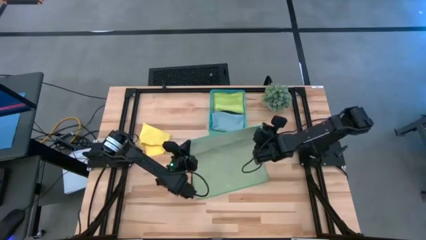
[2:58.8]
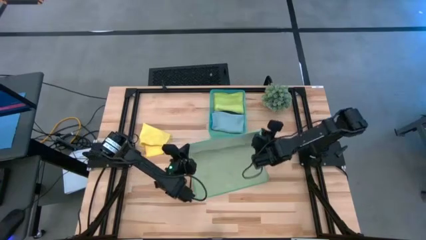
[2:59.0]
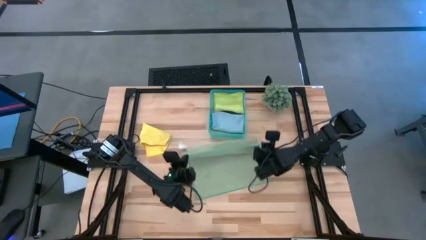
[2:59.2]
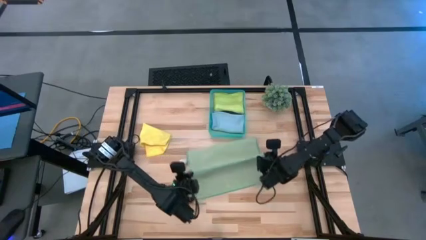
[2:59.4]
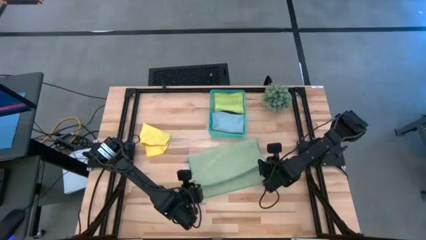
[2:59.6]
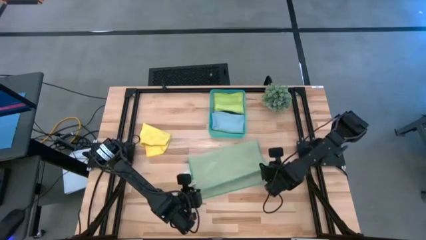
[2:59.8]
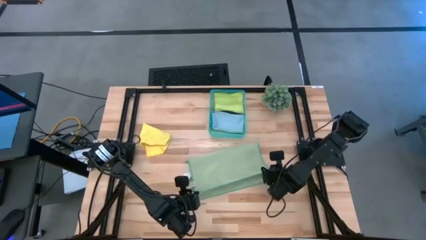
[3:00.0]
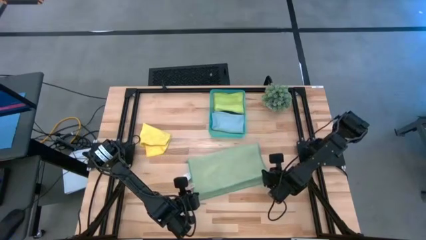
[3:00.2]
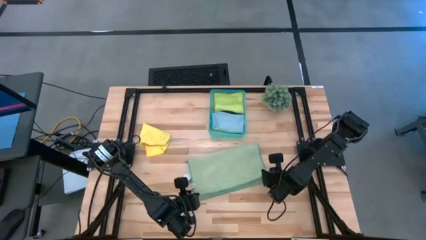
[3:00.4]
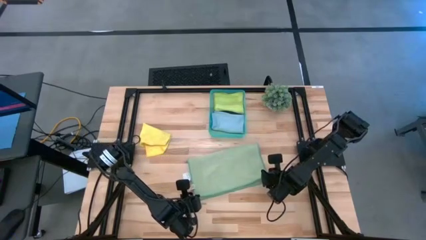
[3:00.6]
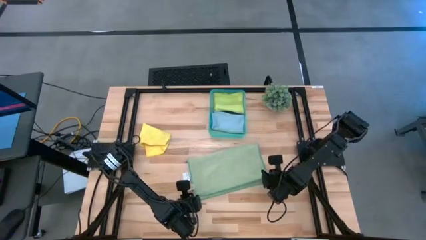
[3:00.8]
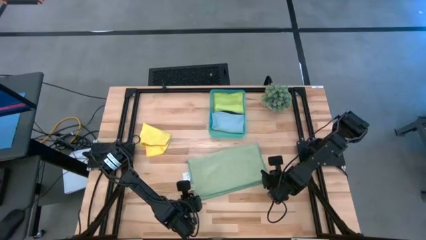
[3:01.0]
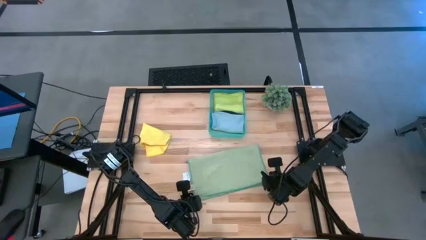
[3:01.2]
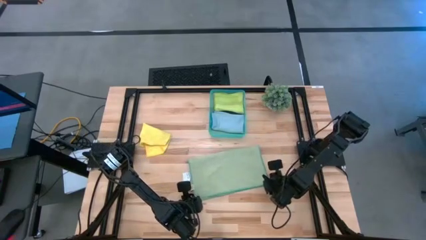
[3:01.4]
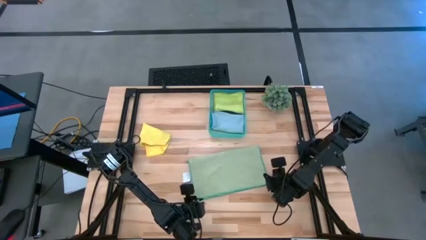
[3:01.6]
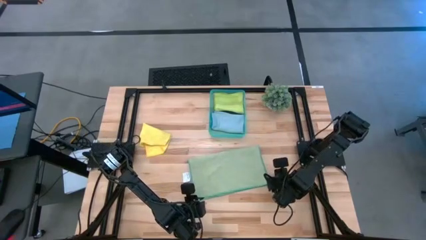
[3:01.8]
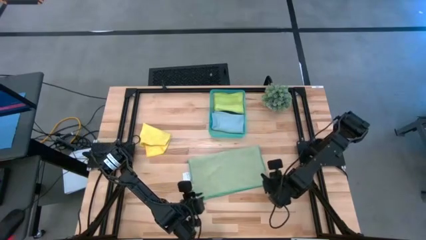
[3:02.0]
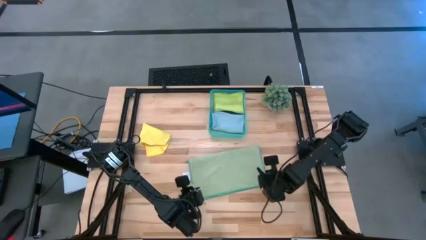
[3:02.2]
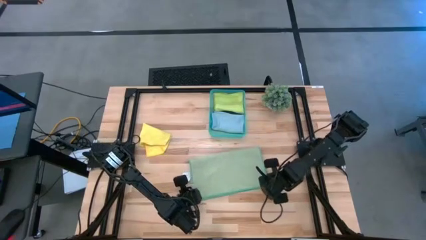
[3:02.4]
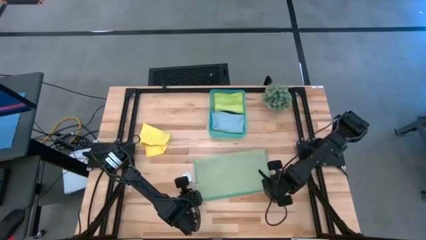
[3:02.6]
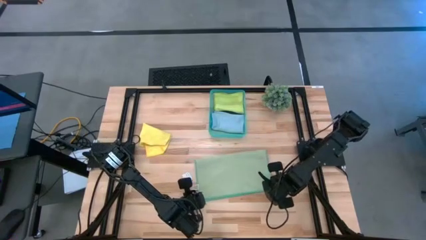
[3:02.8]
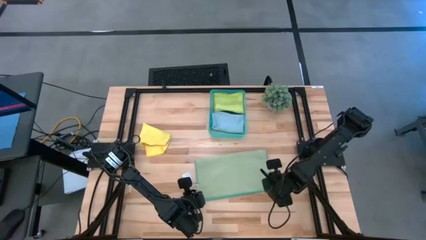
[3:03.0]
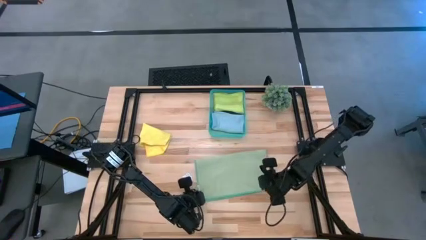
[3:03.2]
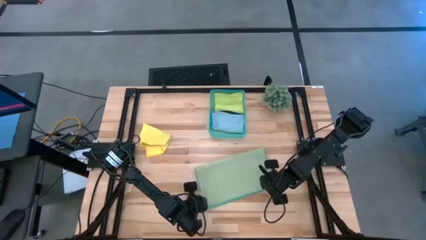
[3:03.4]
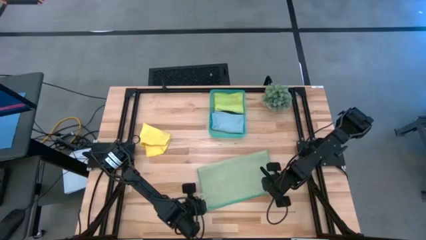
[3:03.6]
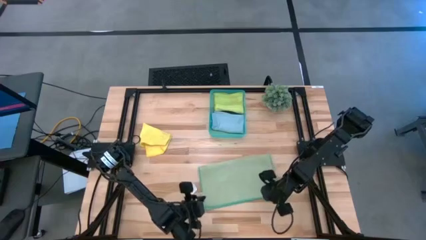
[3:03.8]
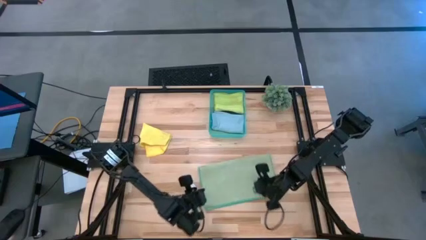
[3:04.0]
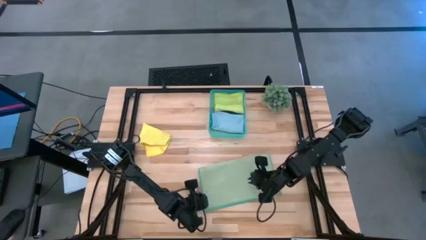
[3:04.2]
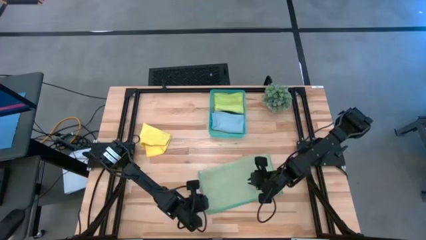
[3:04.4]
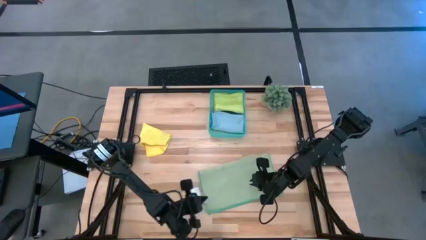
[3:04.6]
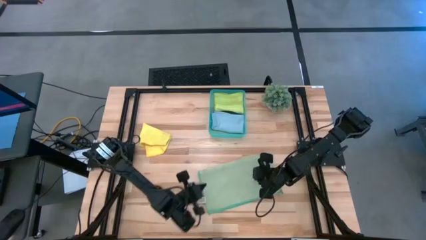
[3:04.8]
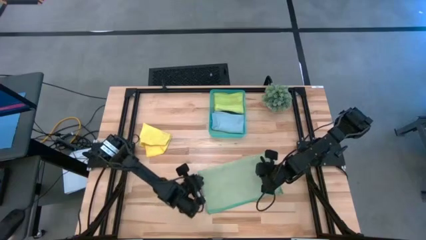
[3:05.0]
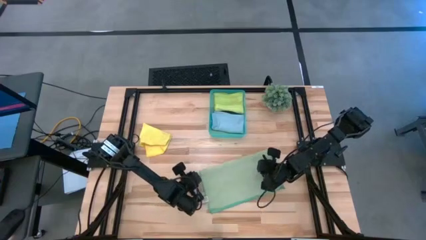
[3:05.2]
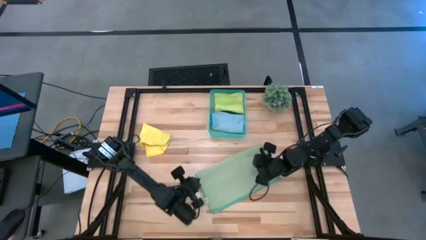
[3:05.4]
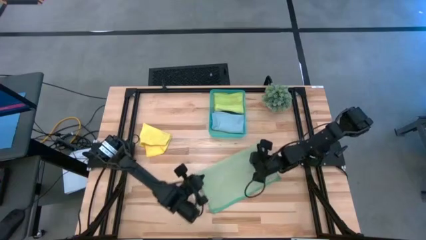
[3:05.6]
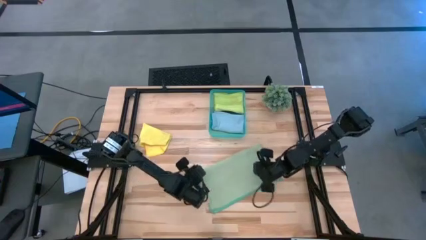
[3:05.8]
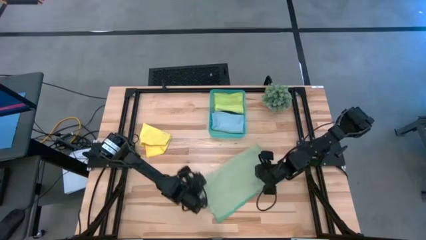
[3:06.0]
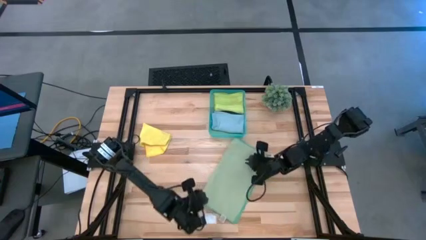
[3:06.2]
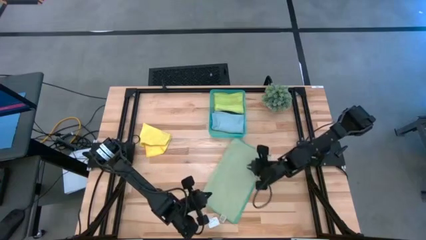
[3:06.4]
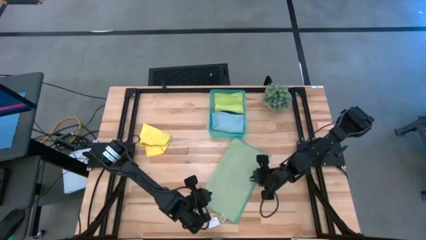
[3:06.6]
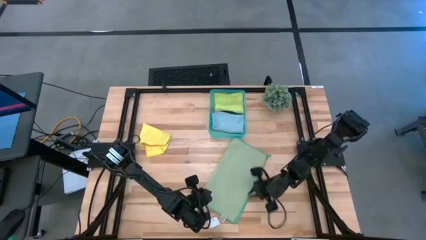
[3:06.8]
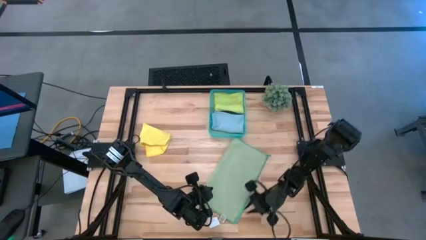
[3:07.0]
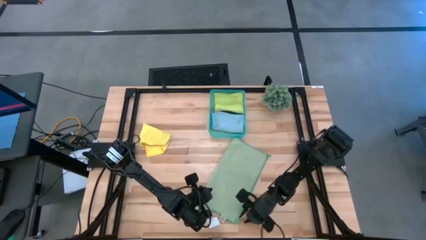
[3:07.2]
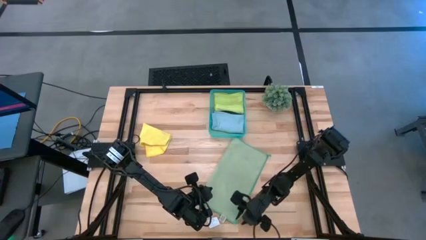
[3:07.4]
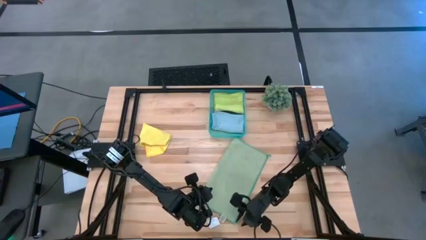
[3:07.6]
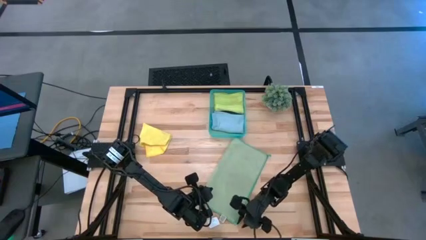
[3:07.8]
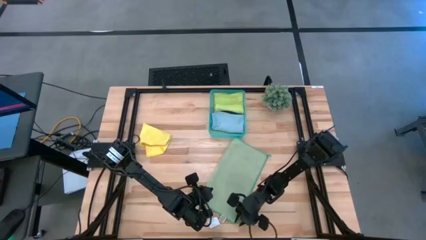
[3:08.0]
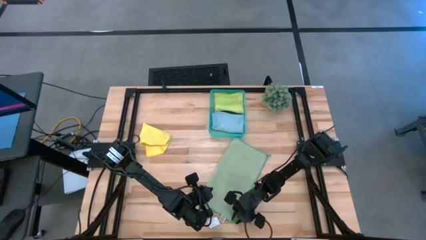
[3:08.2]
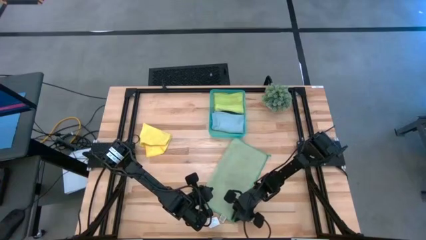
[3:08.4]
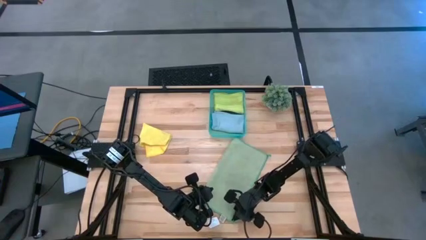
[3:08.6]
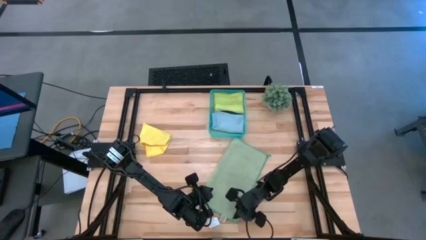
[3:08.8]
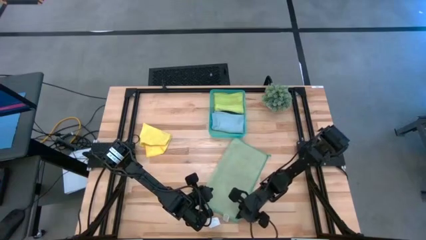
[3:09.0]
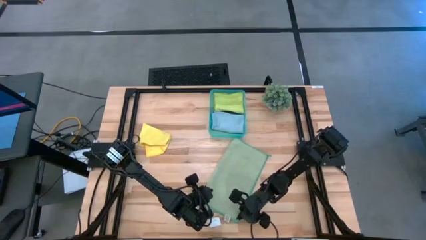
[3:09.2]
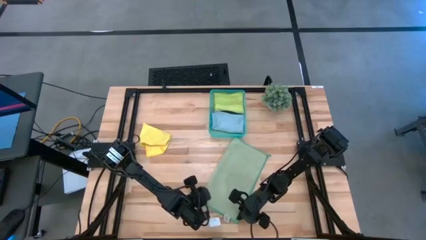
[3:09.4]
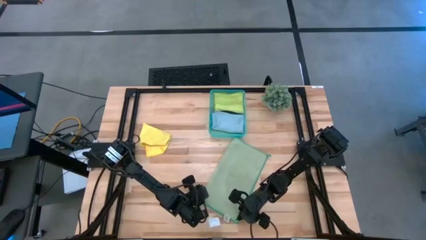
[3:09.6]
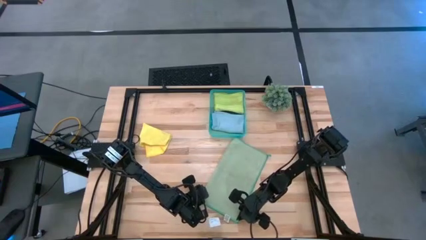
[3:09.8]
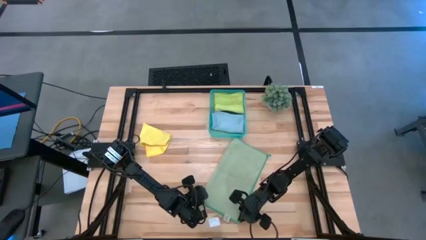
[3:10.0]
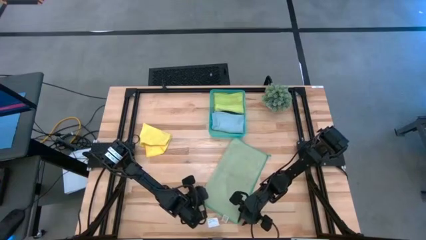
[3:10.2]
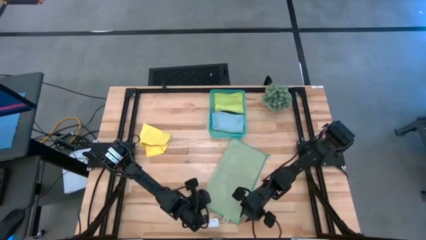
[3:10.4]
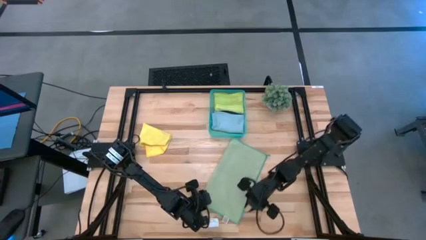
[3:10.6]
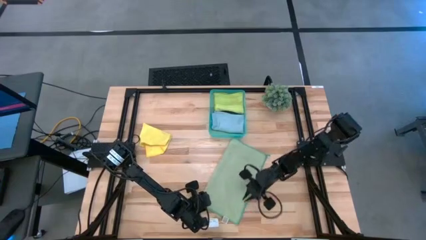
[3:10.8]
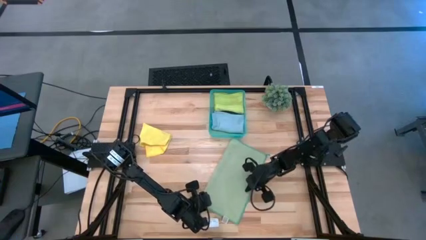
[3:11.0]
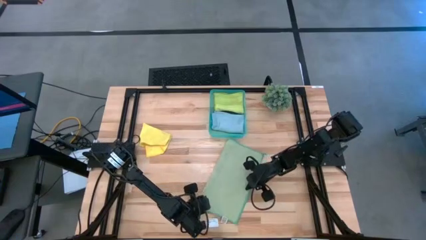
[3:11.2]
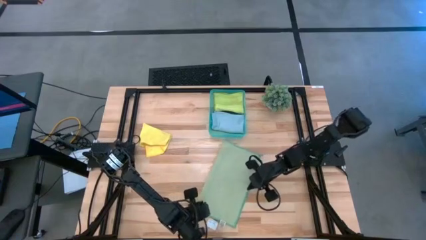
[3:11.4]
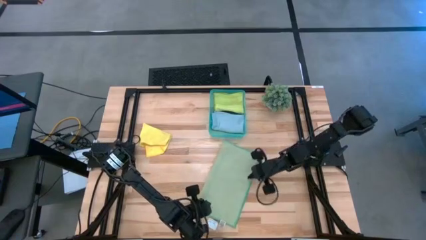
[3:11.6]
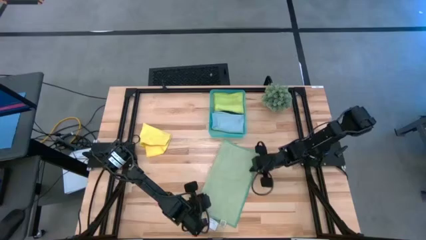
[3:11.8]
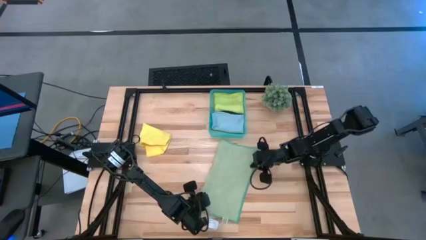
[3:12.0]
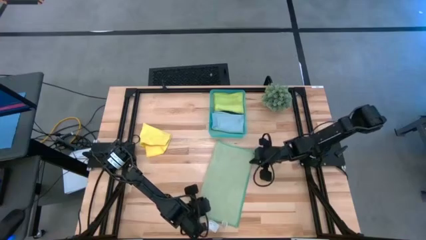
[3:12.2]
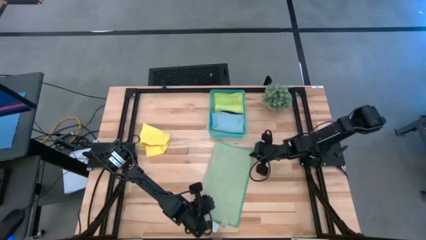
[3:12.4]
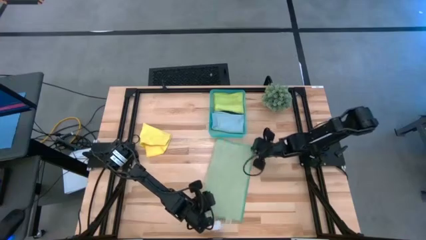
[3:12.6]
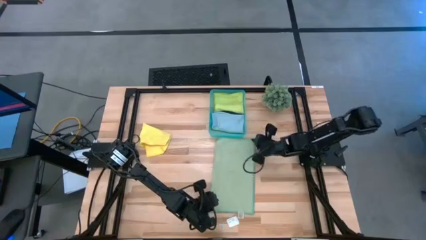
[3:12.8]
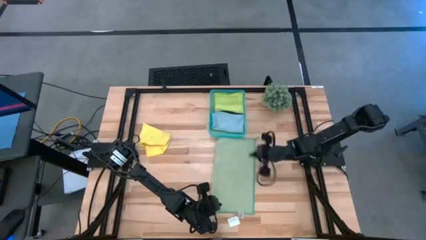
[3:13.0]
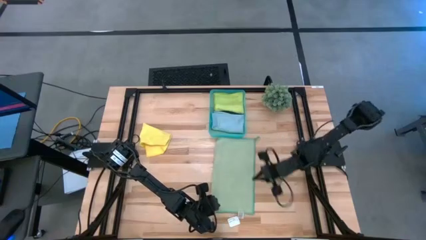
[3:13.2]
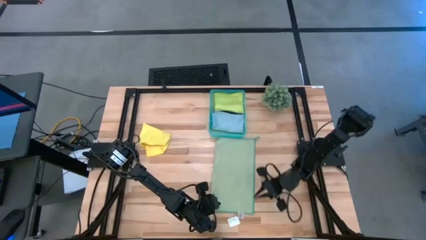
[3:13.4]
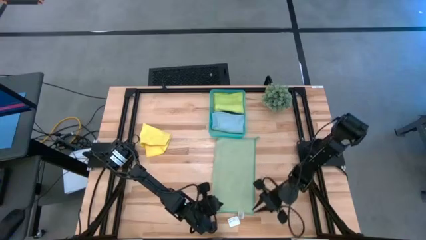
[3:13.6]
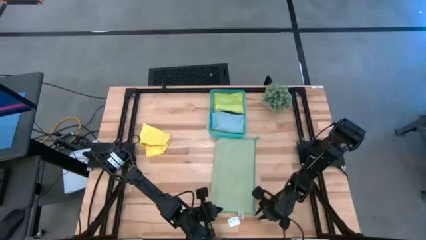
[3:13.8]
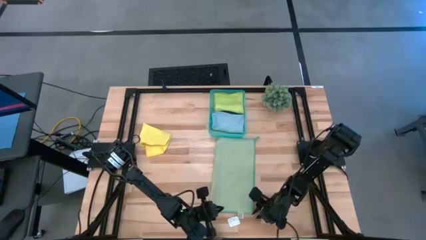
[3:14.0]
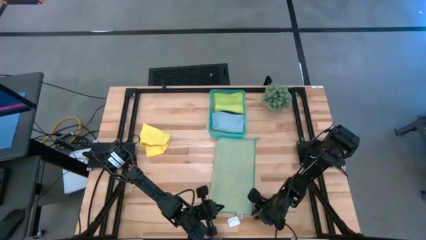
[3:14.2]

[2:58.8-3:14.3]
Task: Fold microfiber towels
Fold the green microfiber cloth
